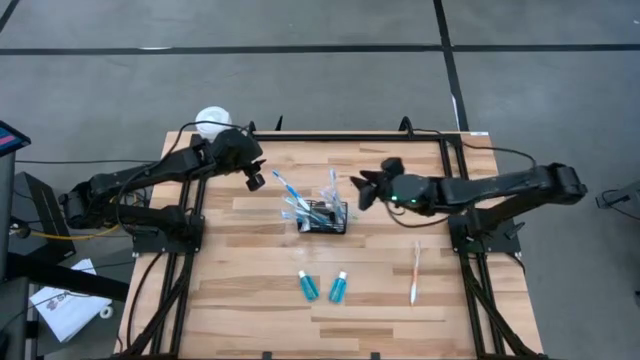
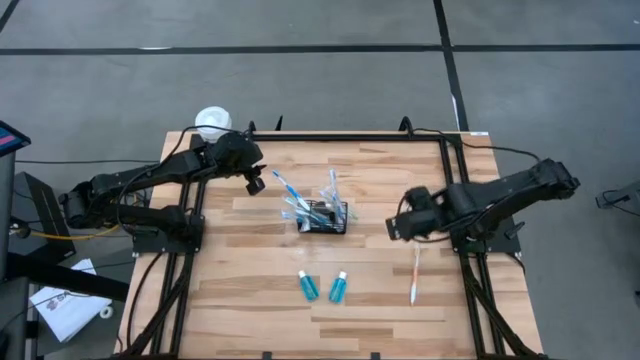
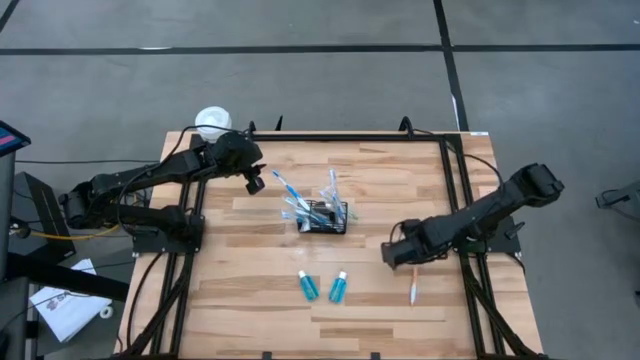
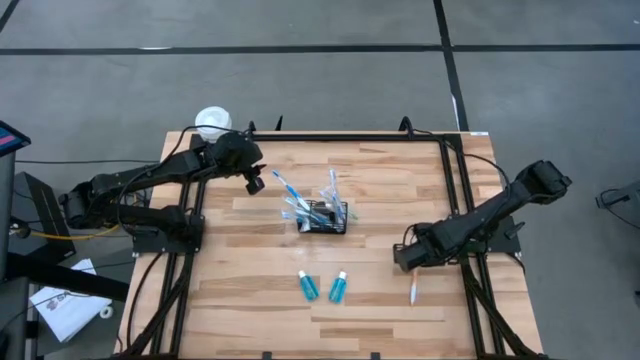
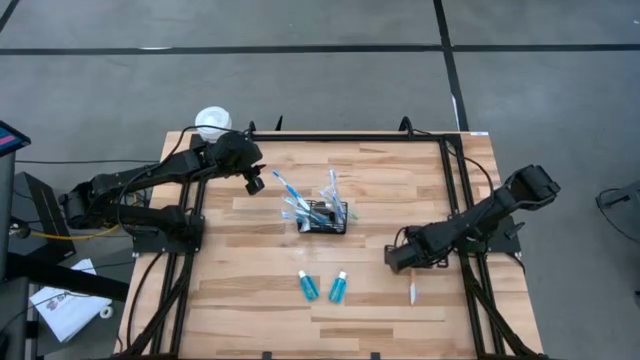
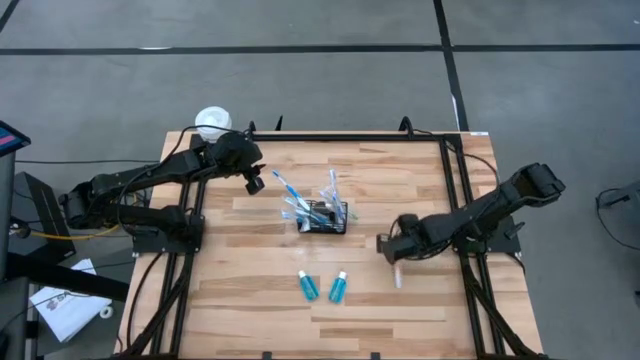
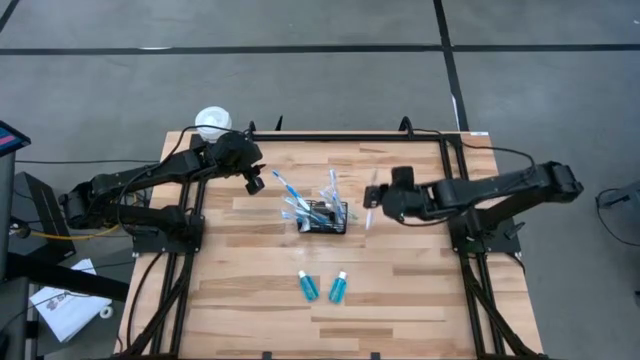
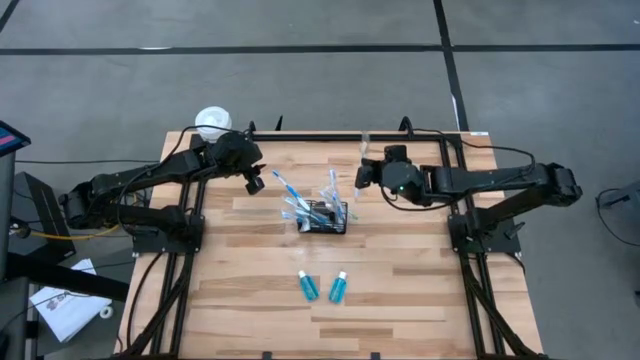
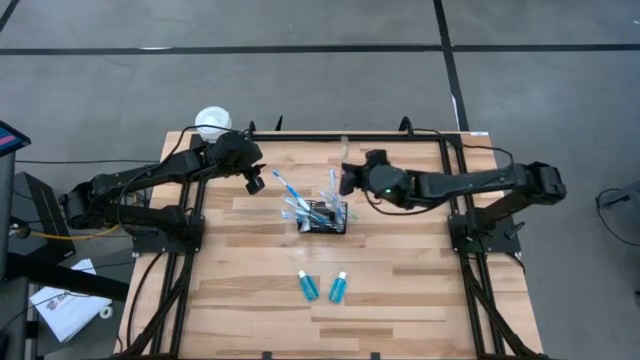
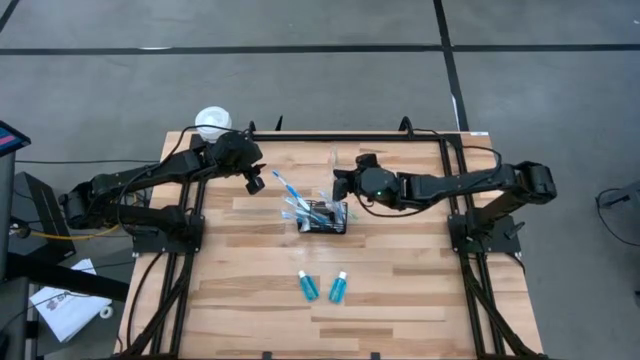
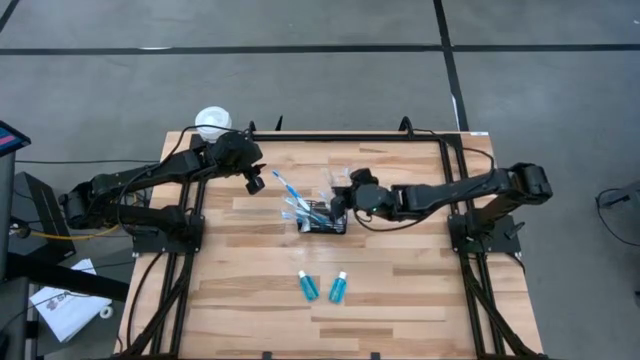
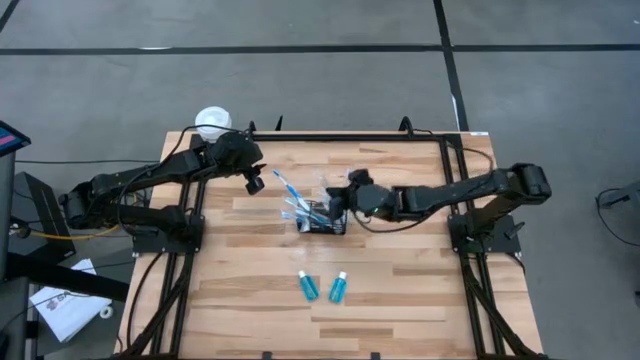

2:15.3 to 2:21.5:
Task: Pick & Place toothbrushing station
Put the orange toothbrush into the mesh

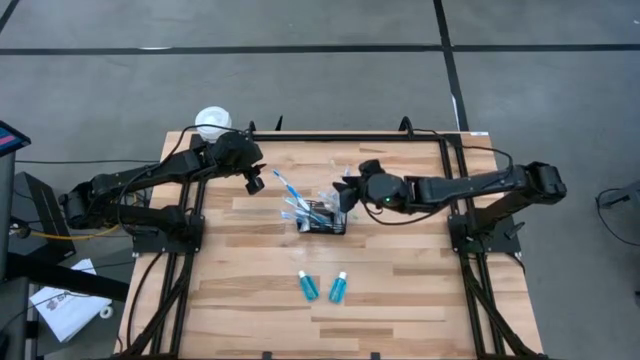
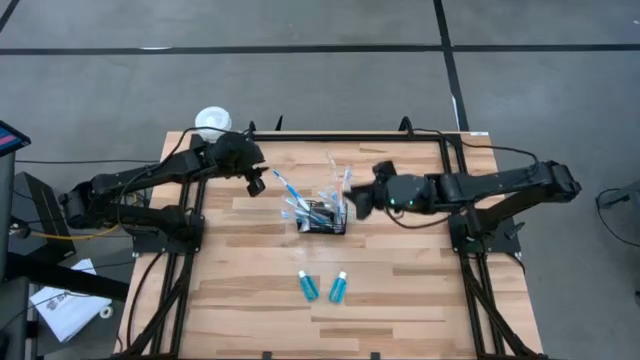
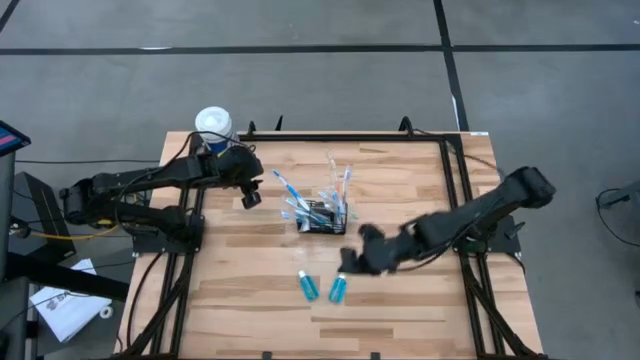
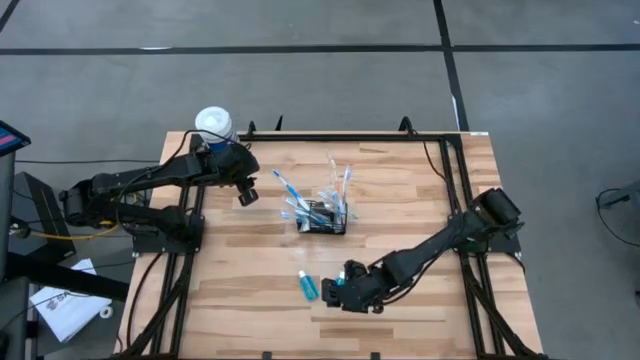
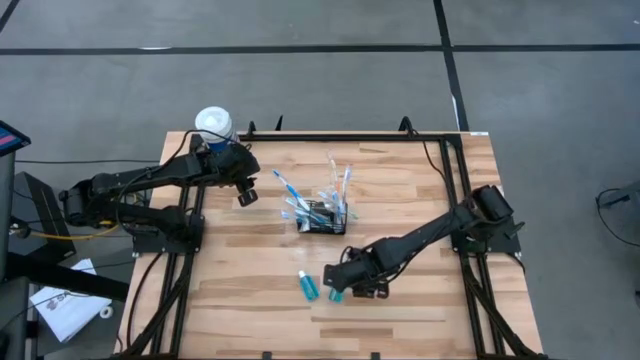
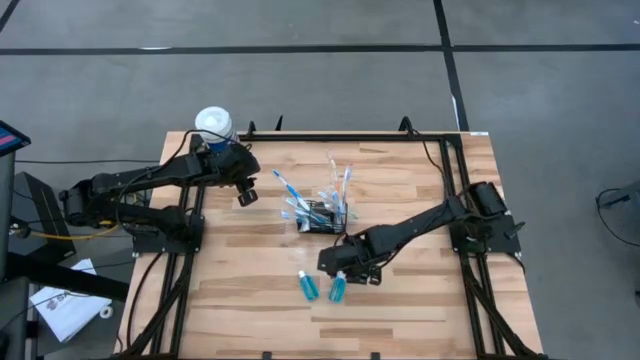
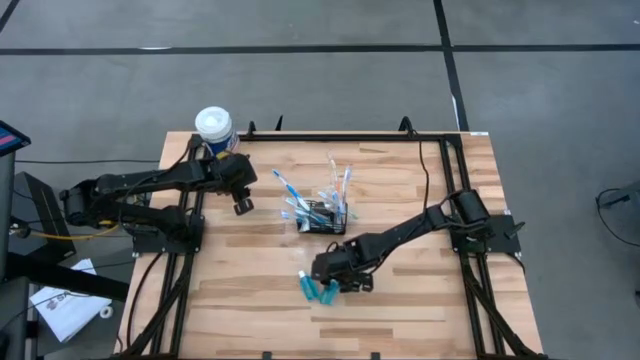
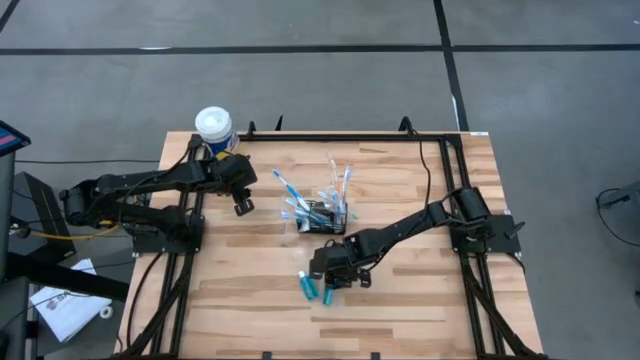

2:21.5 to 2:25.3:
Put the blue mouthwash into the mesh

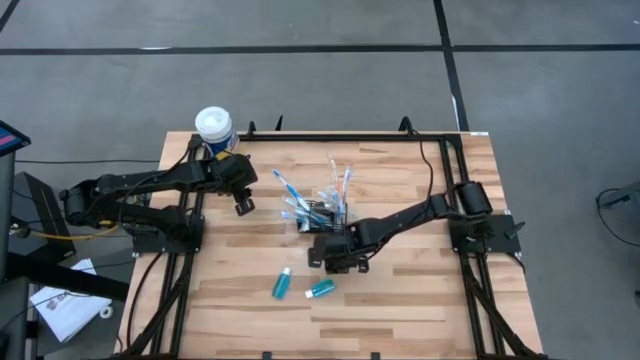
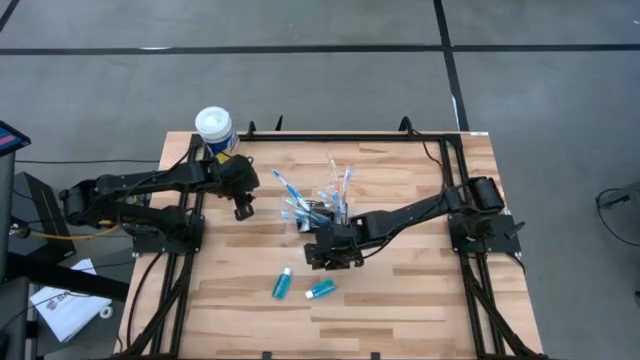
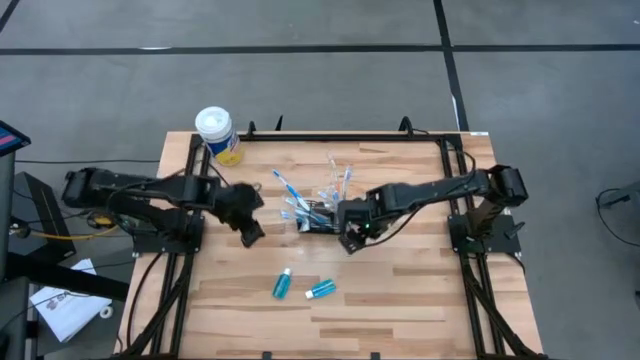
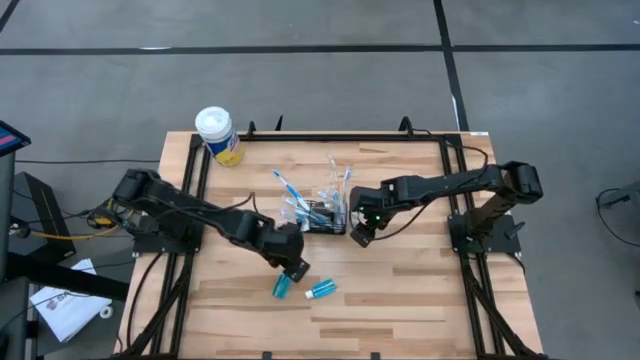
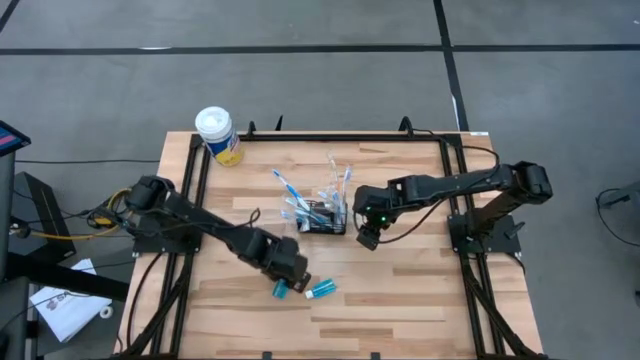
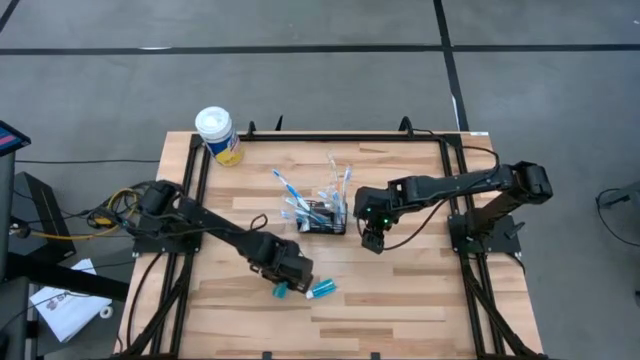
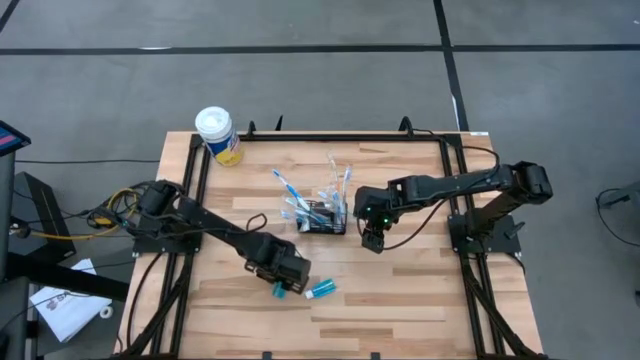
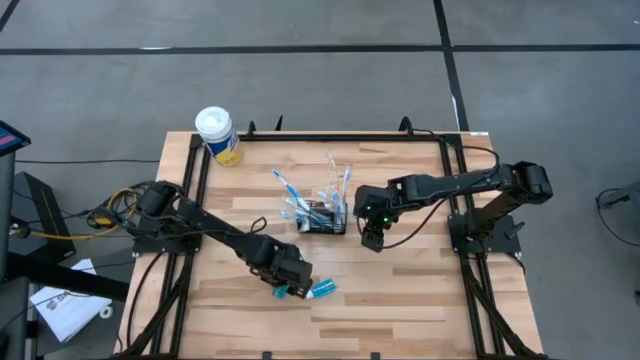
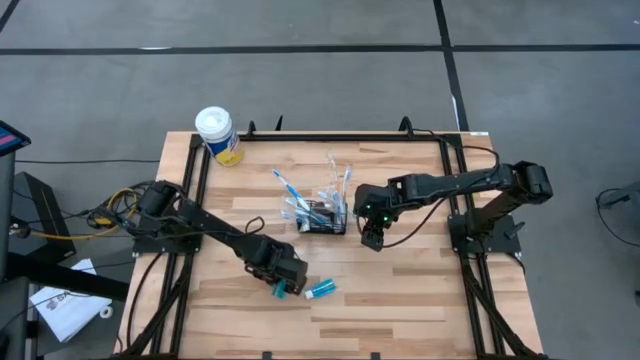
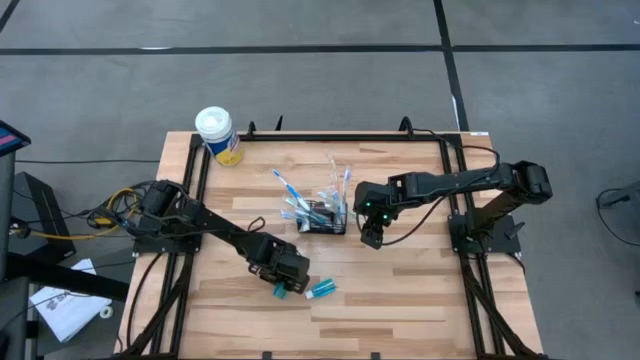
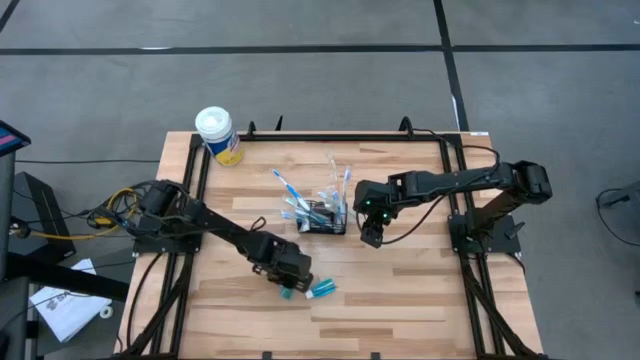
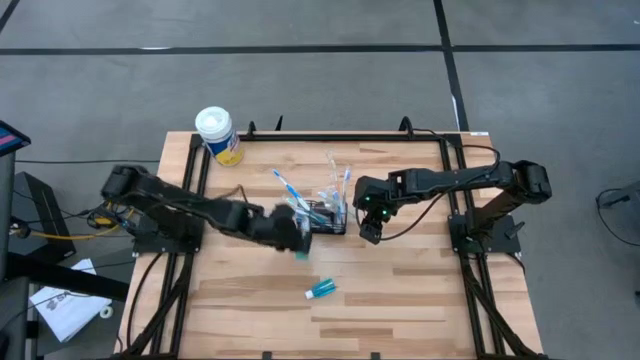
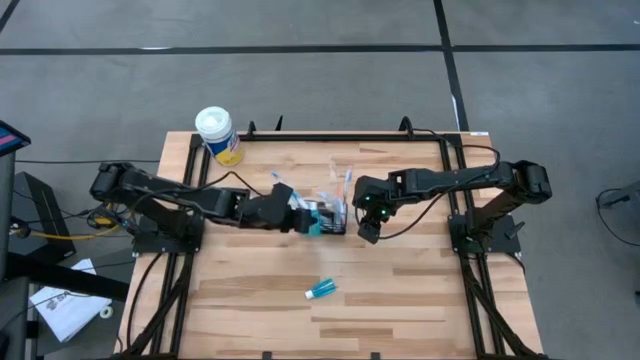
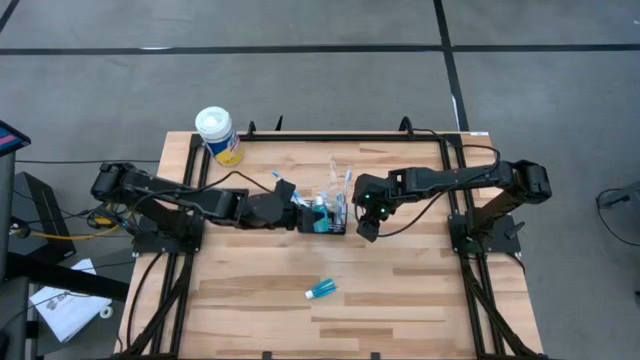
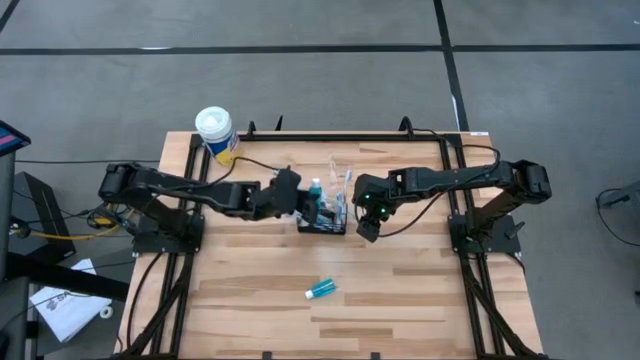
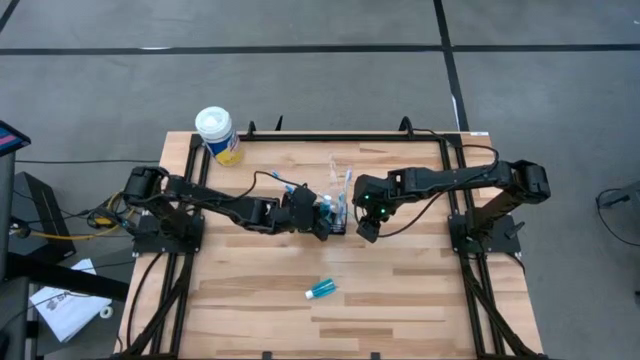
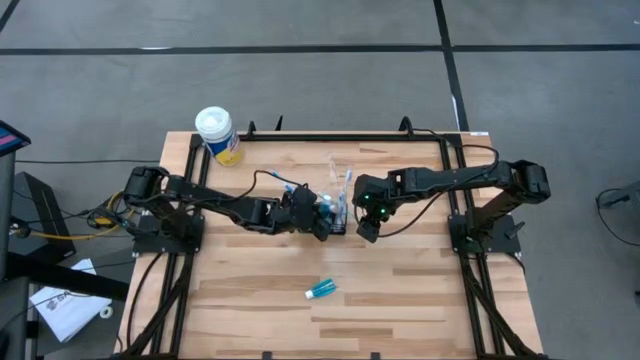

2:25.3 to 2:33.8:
Put the blue mouthwash into the mesh

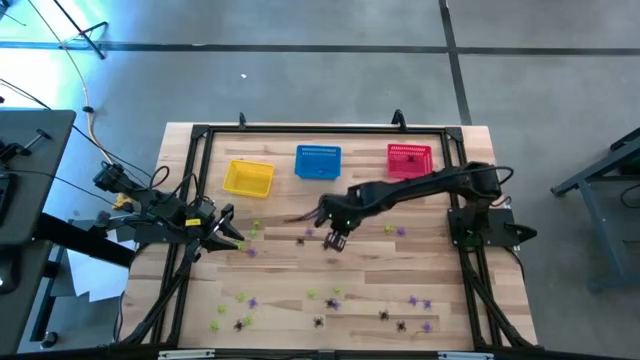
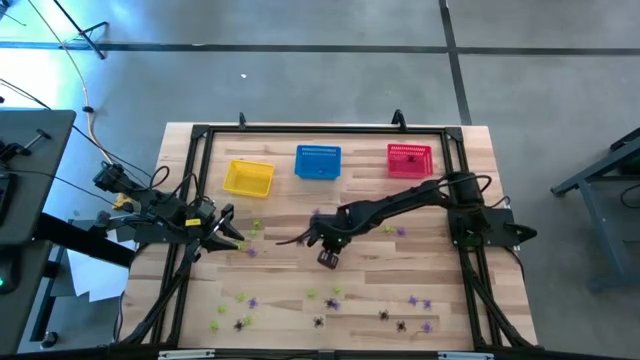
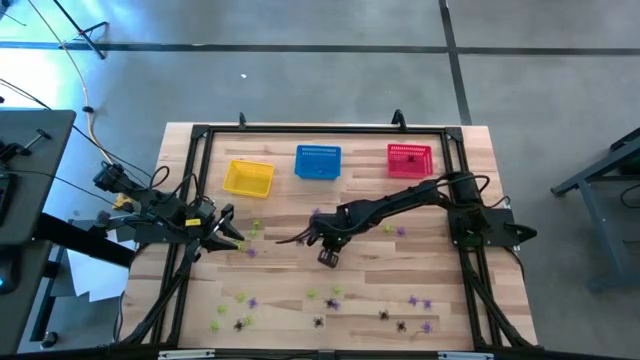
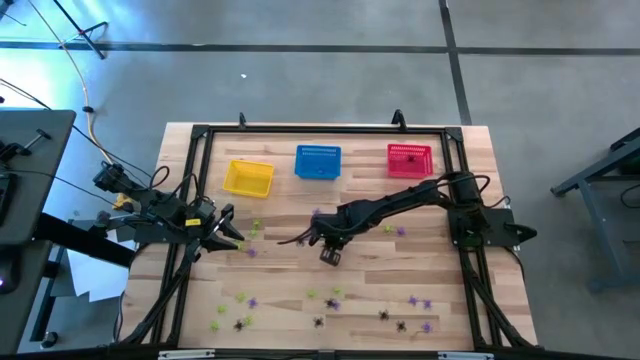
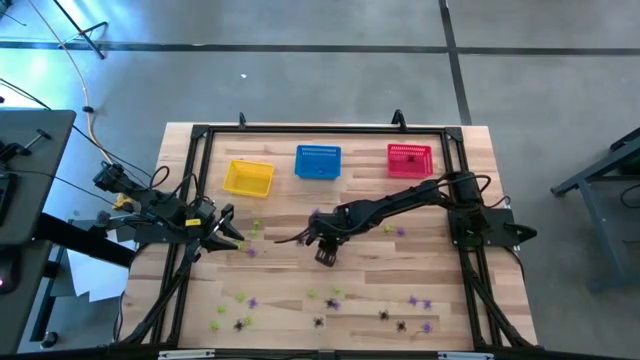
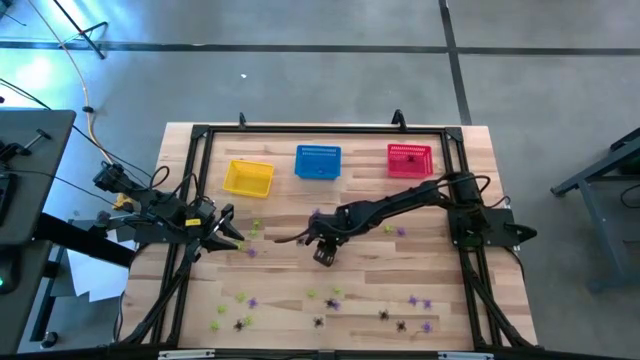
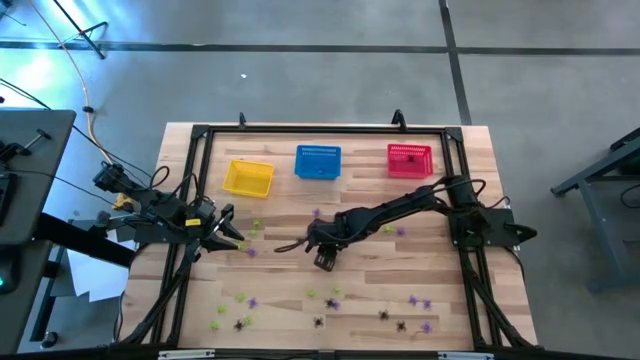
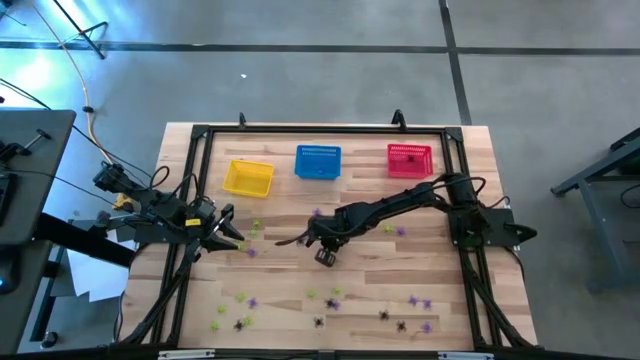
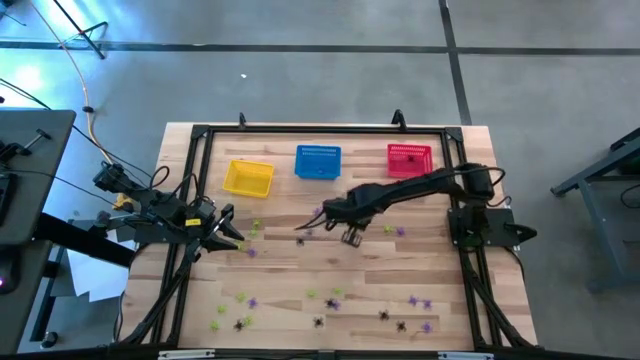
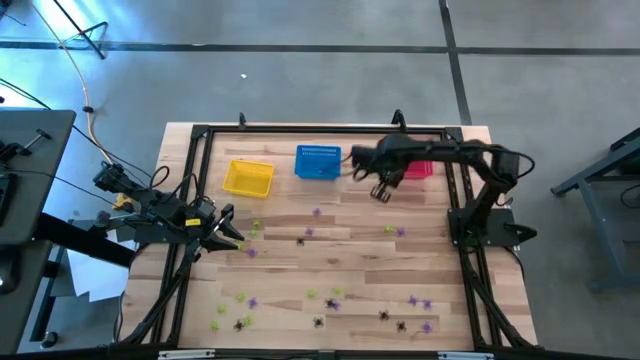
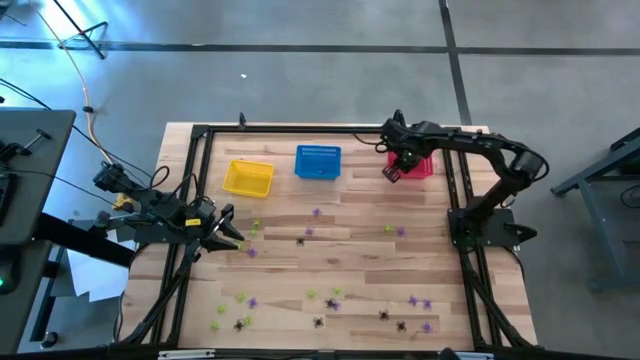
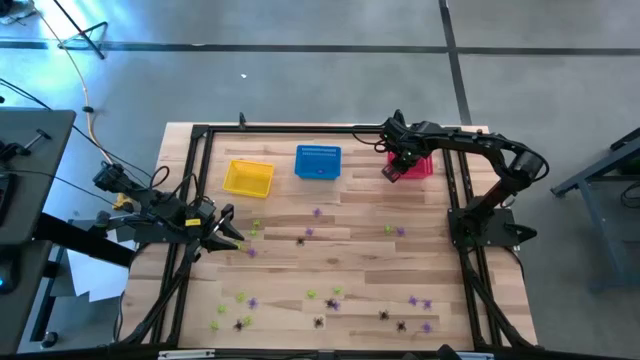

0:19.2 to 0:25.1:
Task: Sort Halloween decoration
Put the black spider toy into the red bin
